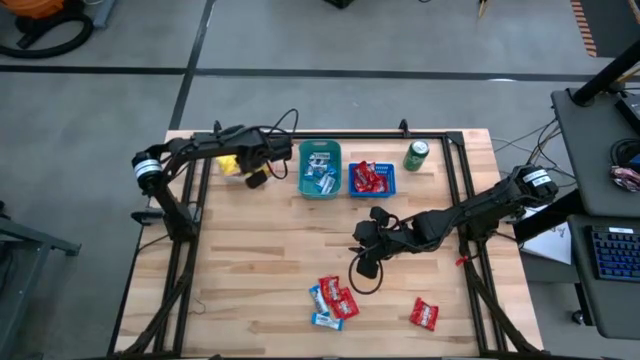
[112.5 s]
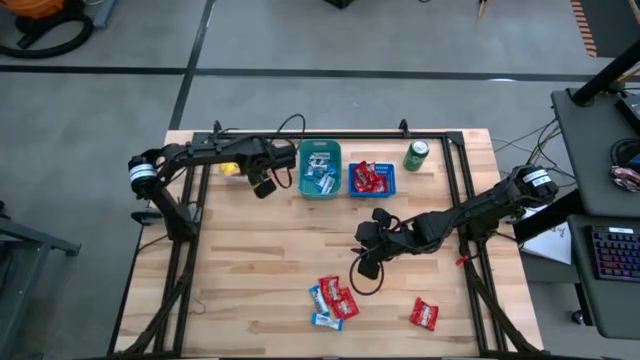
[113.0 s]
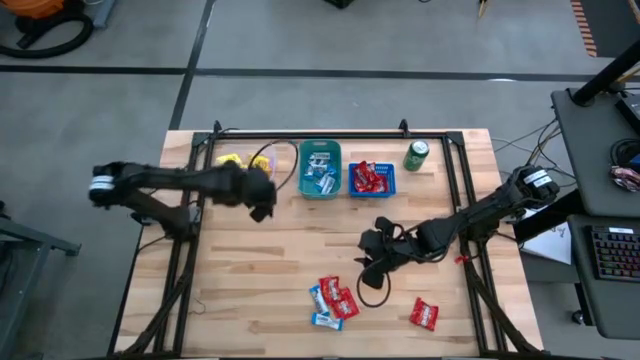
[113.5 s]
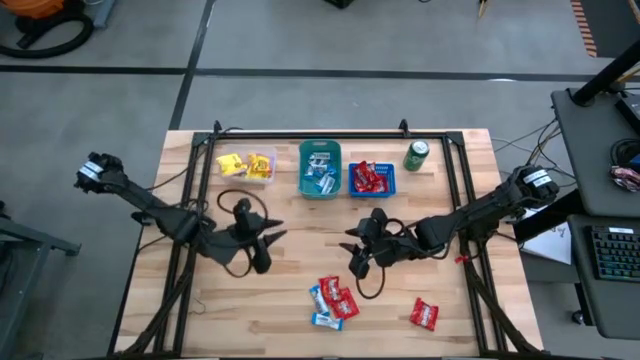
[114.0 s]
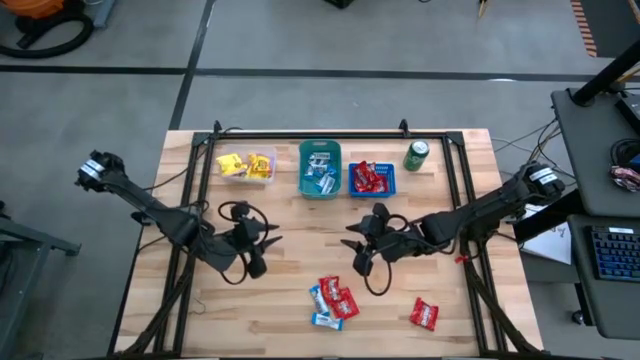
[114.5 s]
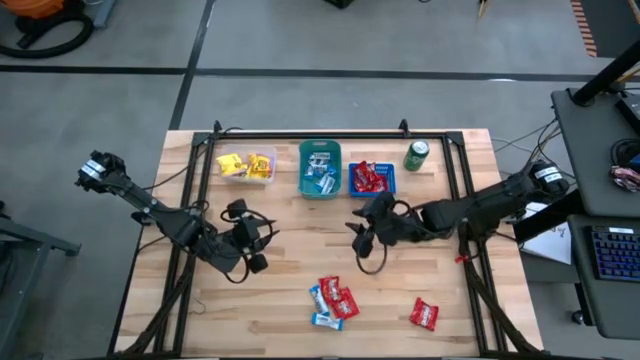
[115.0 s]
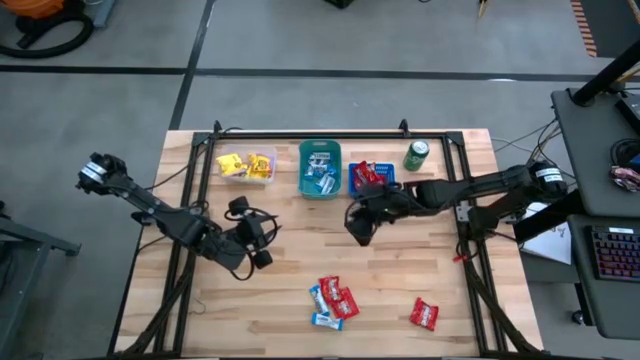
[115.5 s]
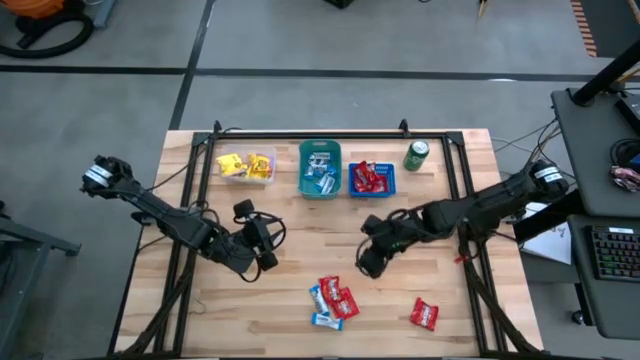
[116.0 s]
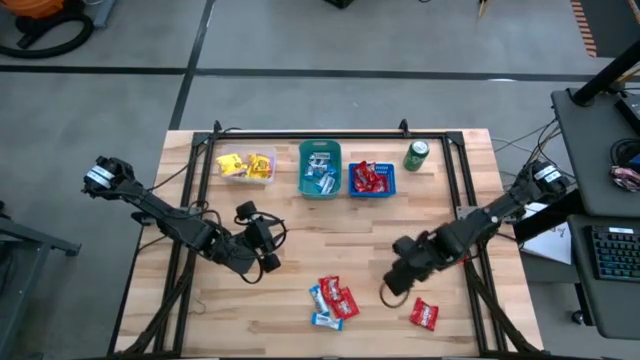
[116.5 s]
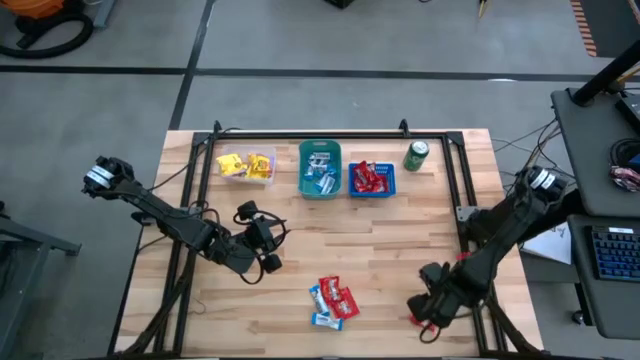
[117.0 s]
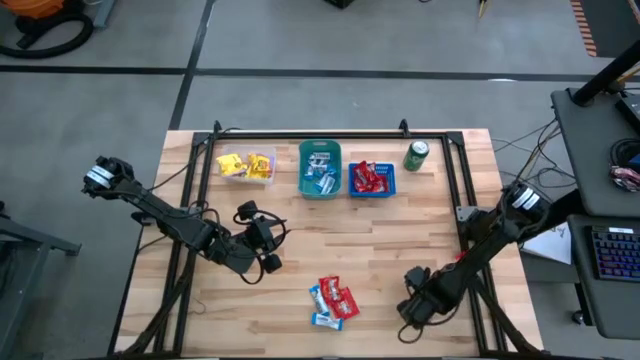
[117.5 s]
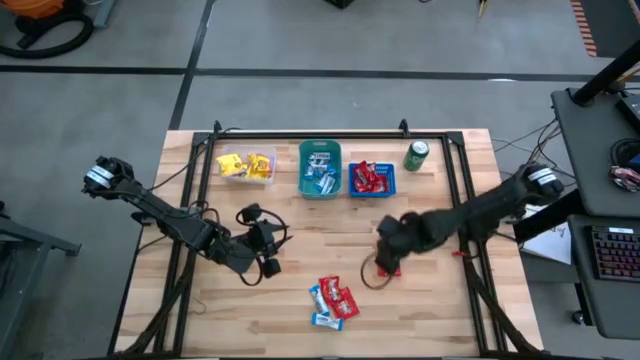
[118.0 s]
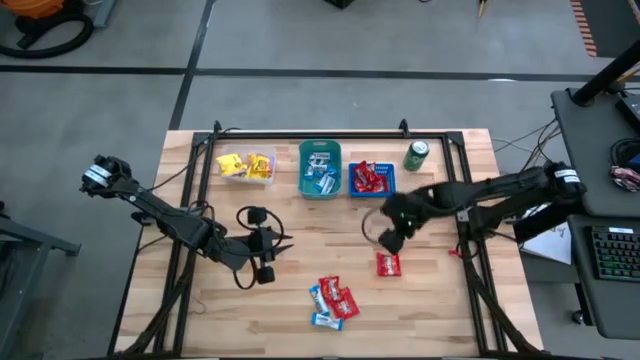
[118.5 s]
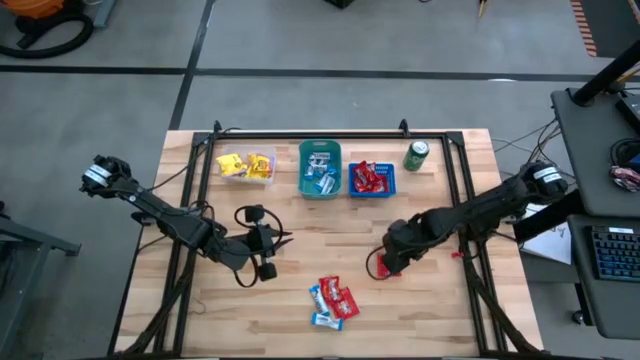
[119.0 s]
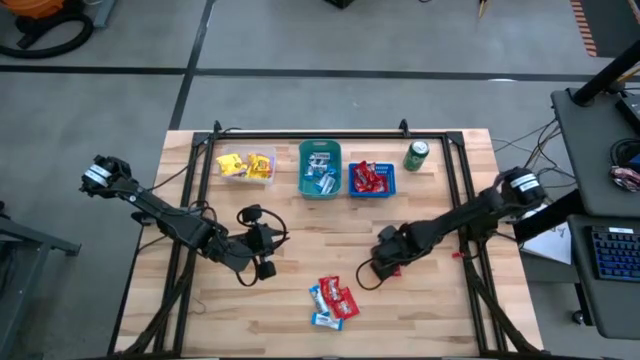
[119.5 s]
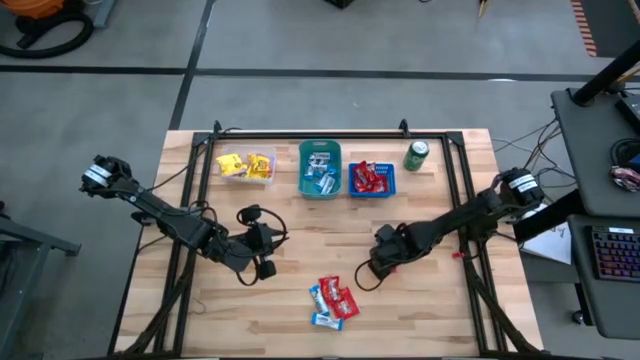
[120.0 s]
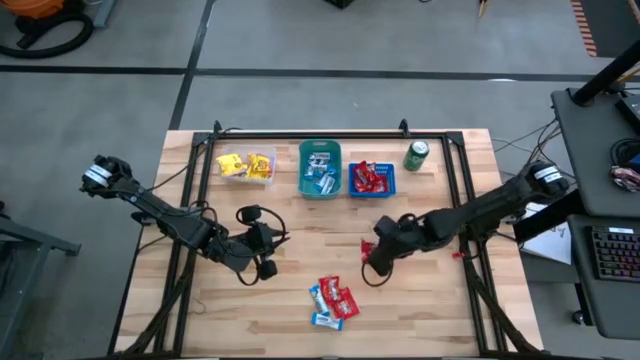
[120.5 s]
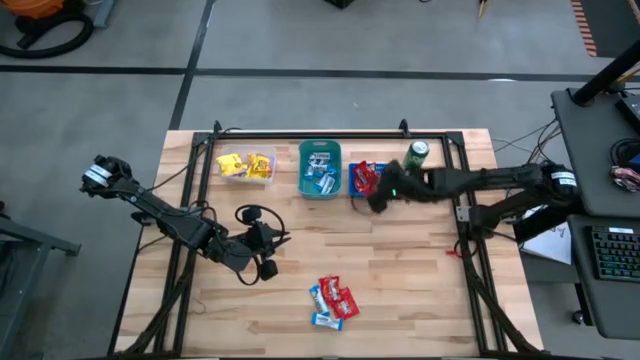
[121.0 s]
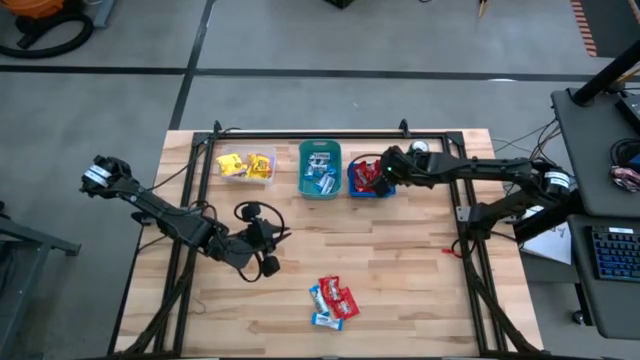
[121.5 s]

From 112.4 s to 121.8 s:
Task: Sort candy
Put the red candy into the blue bin

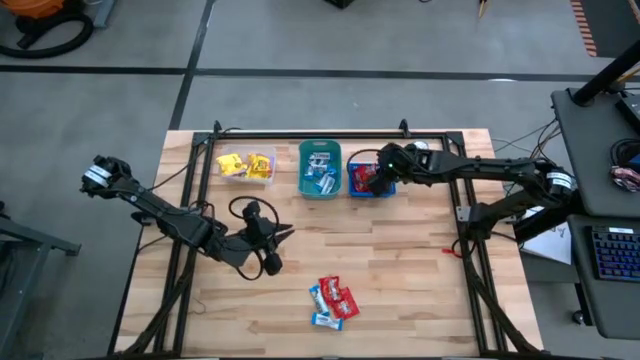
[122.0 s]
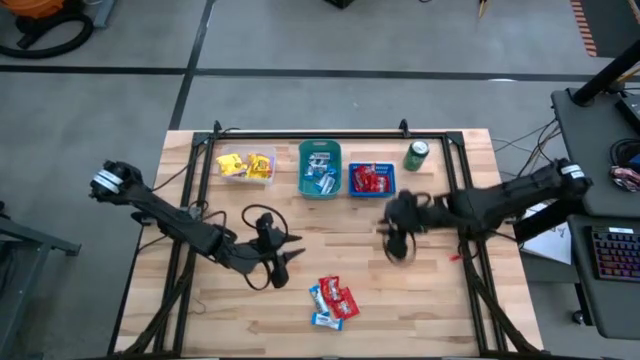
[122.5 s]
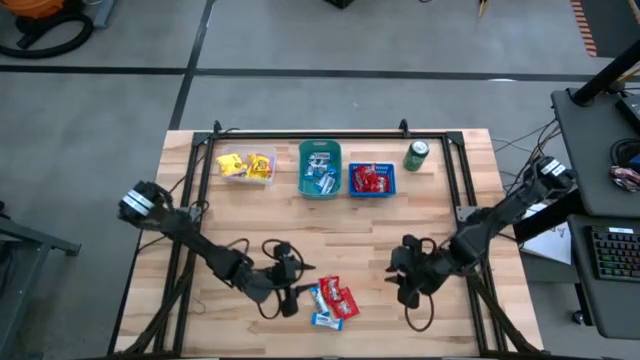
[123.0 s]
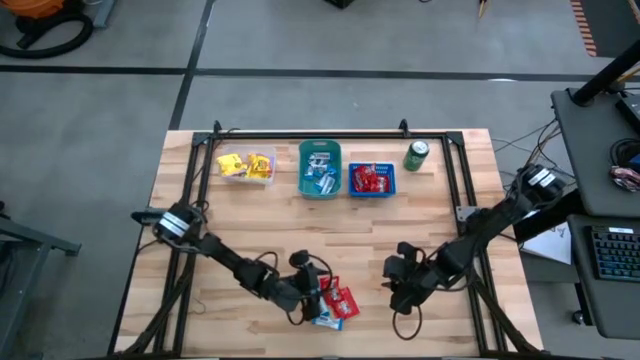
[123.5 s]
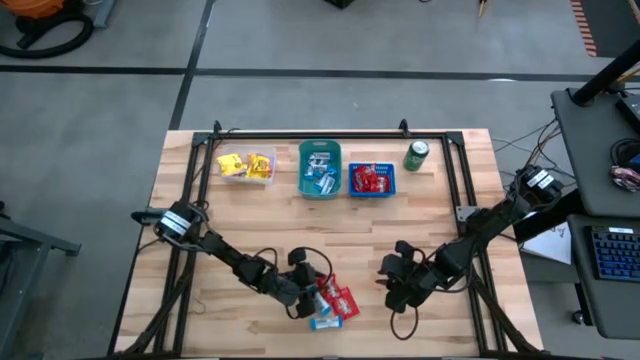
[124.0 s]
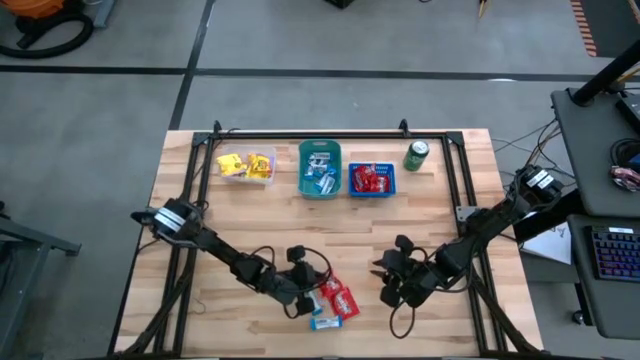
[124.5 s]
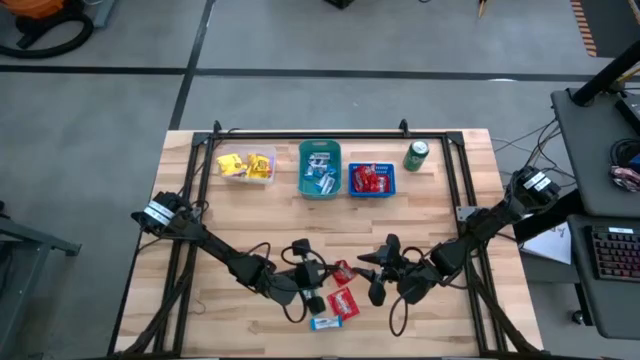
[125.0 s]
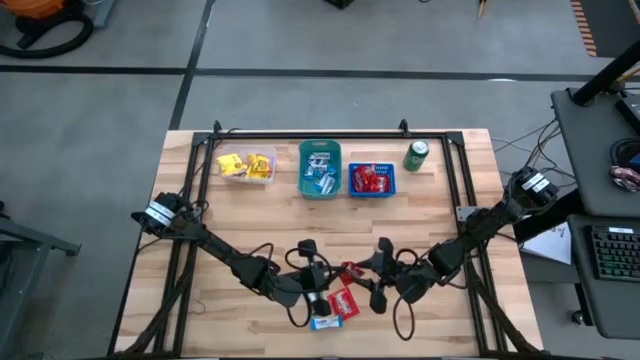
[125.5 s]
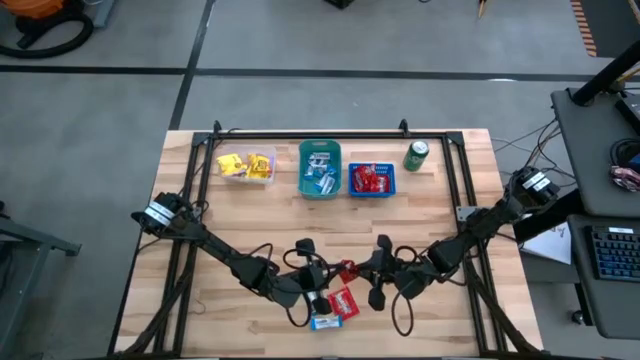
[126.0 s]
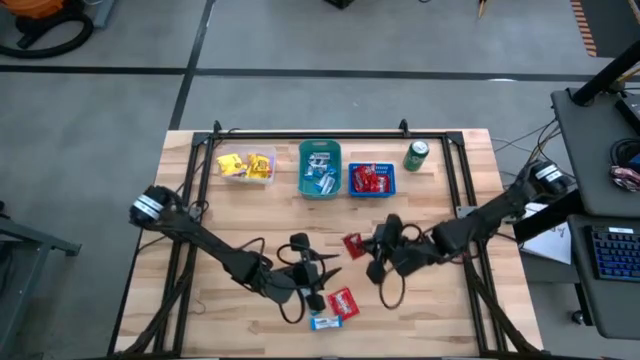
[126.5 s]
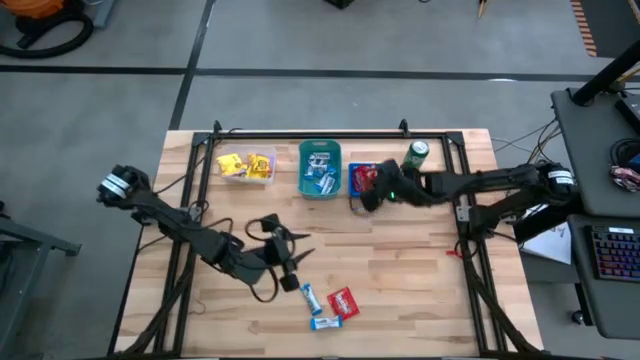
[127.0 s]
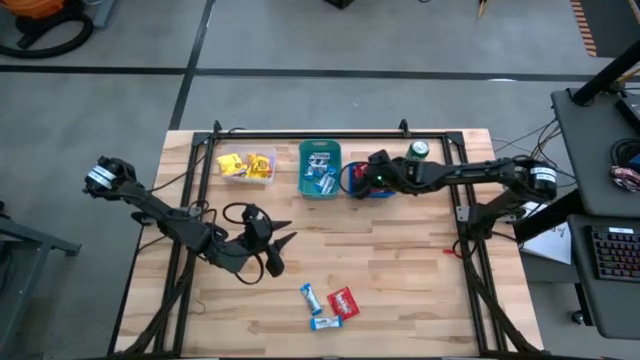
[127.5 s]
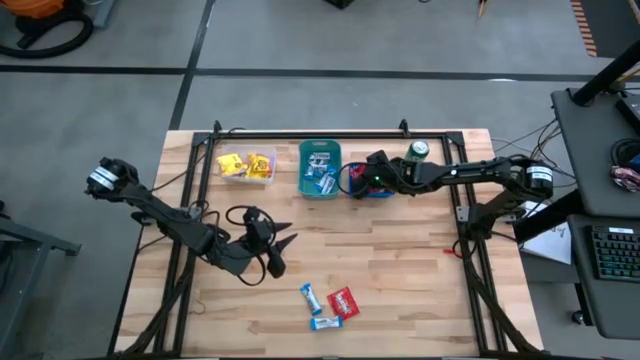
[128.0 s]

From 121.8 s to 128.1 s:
Put the red candy into the blue bin

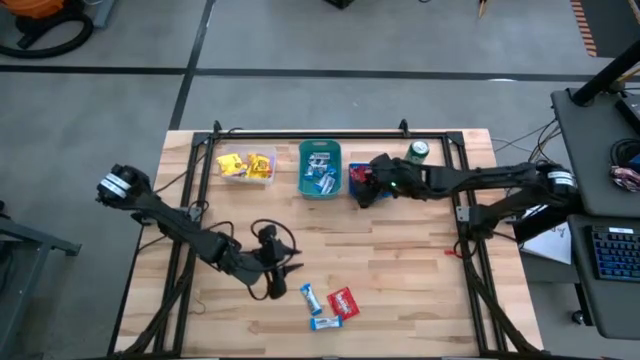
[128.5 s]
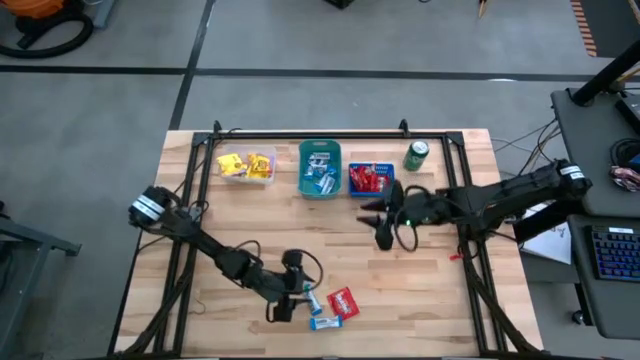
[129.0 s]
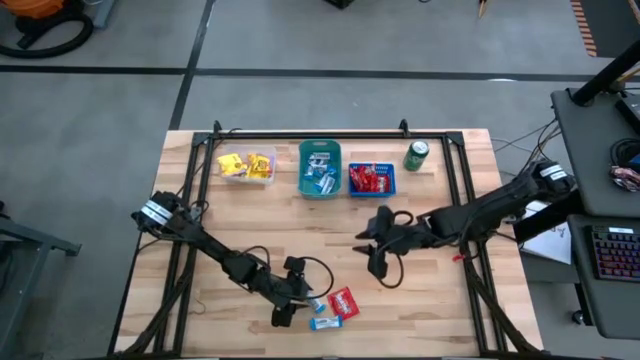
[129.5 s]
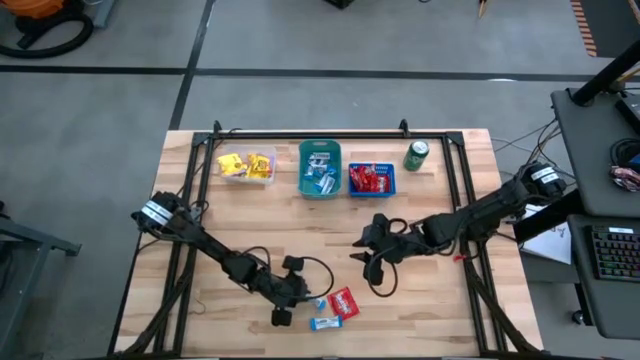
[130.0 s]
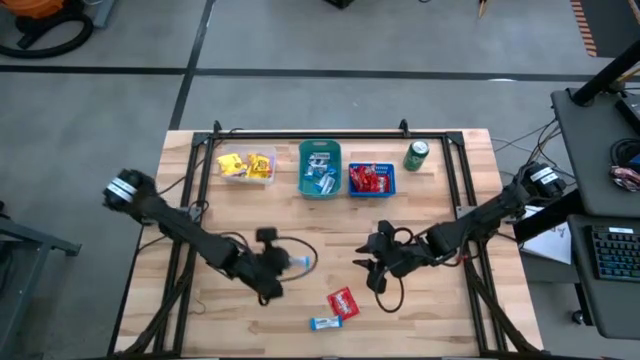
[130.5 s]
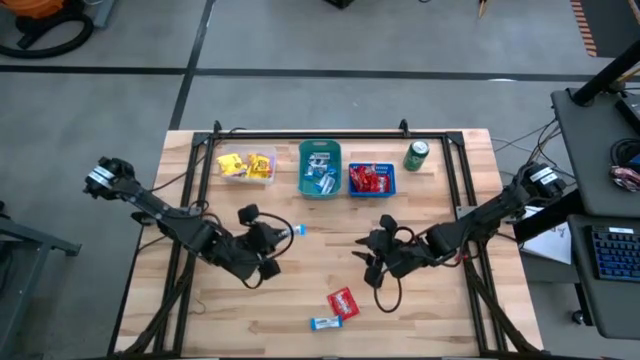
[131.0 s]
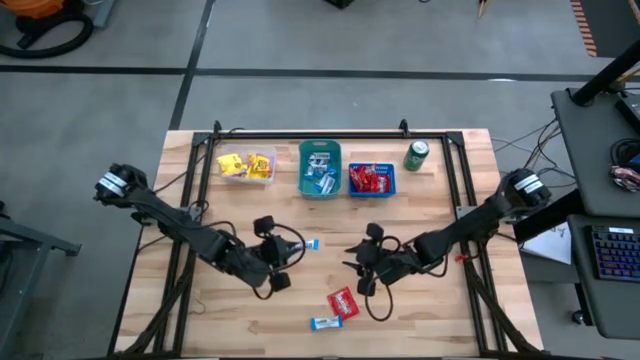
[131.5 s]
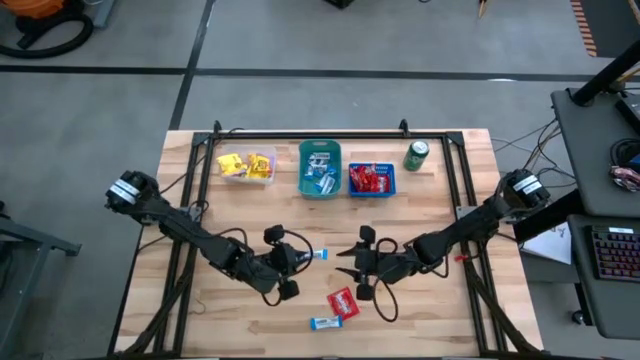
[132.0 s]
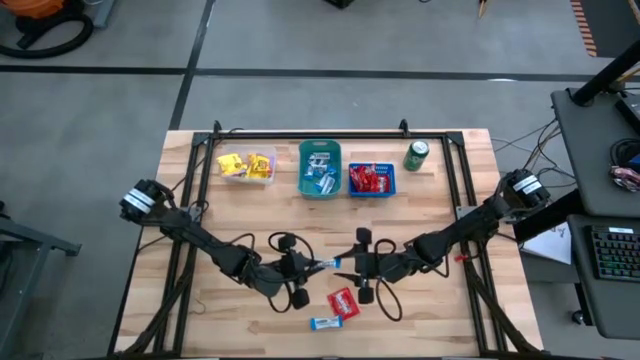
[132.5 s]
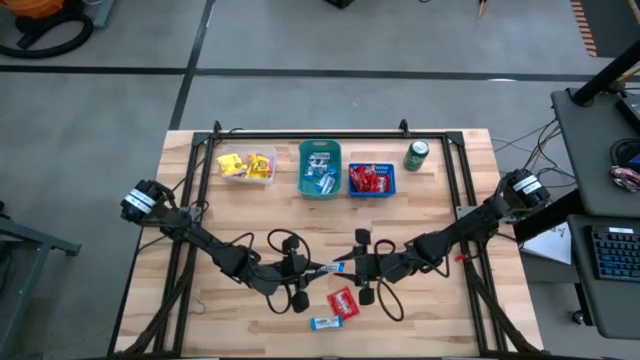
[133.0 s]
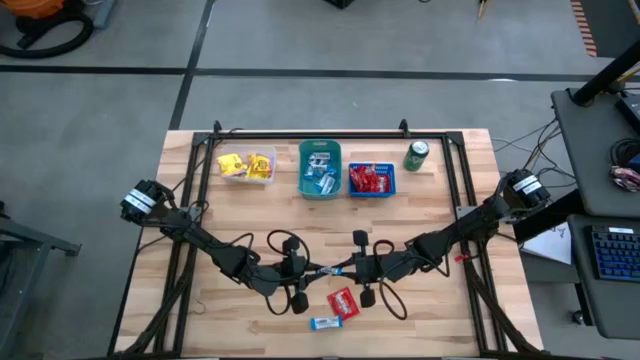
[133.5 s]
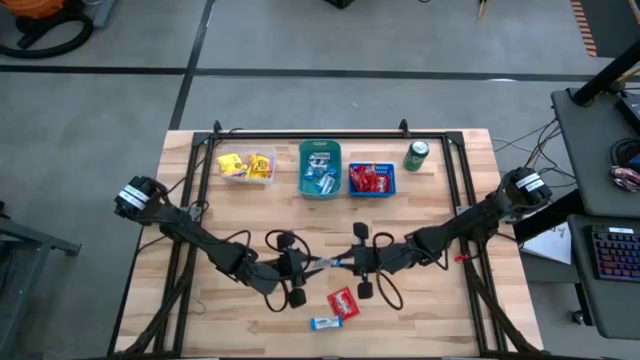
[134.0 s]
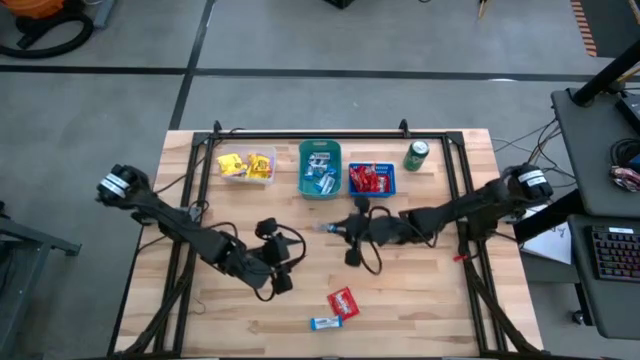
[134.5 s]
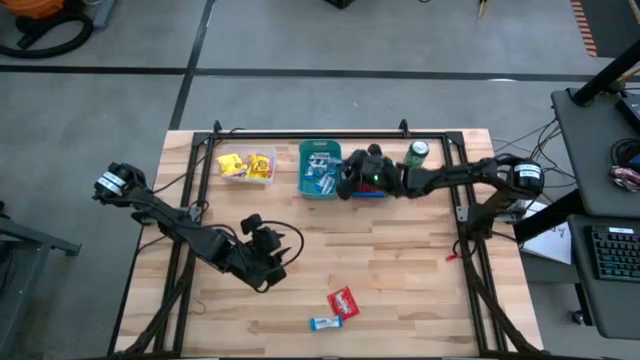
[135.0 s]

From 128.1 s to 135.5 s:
Put the white chocolate into the green bin
